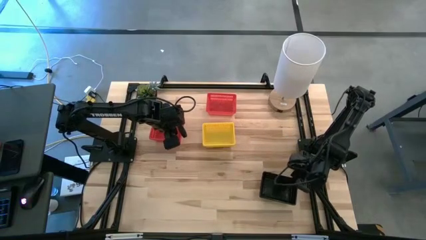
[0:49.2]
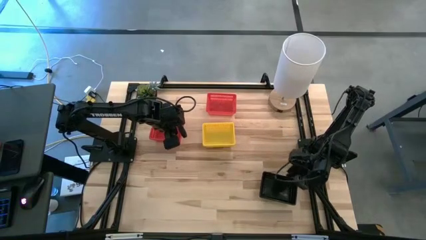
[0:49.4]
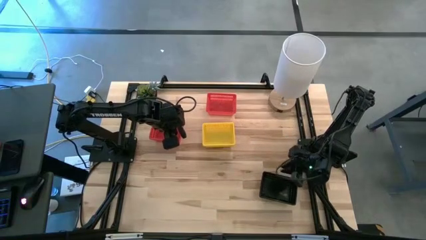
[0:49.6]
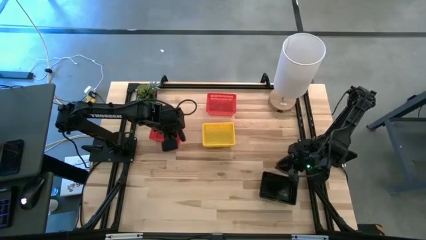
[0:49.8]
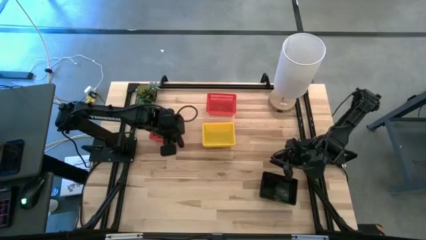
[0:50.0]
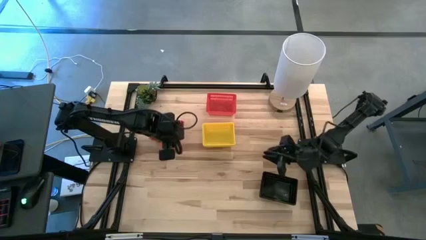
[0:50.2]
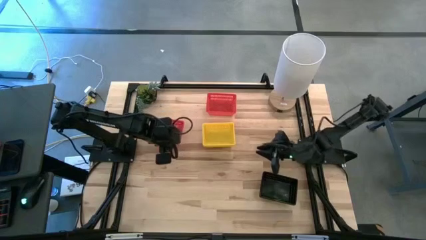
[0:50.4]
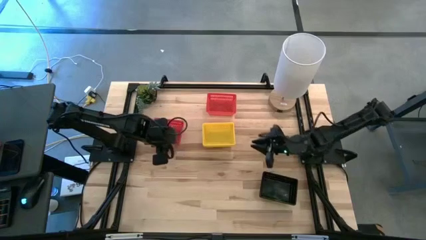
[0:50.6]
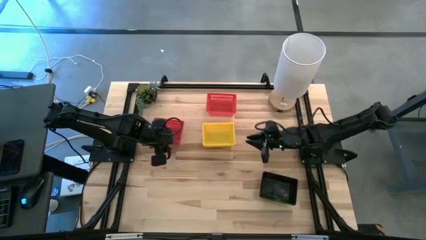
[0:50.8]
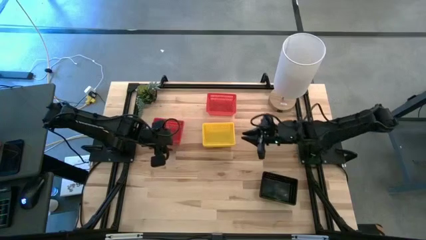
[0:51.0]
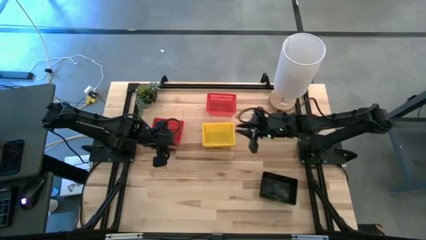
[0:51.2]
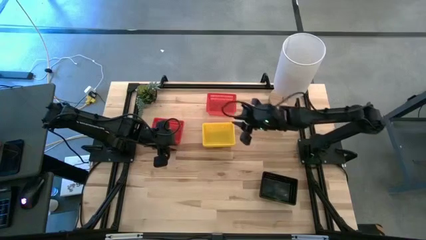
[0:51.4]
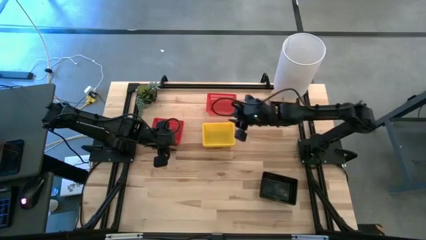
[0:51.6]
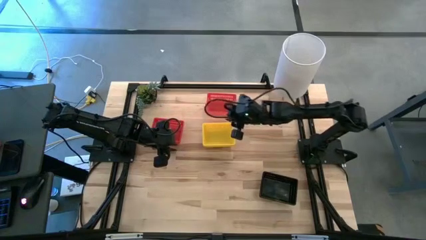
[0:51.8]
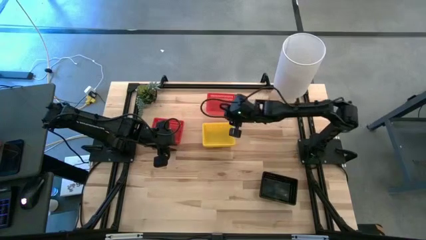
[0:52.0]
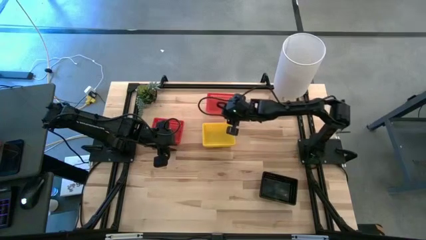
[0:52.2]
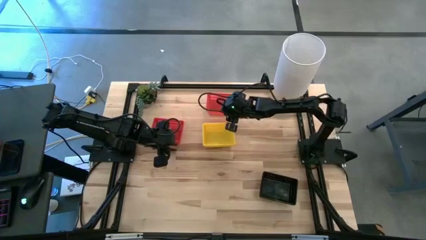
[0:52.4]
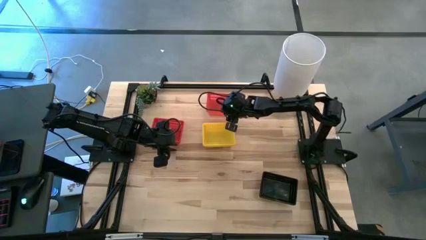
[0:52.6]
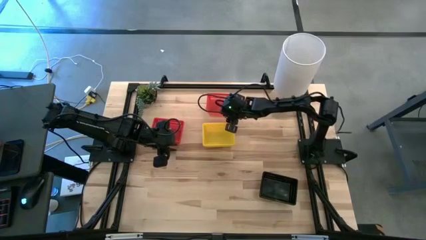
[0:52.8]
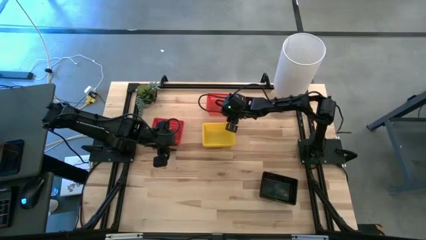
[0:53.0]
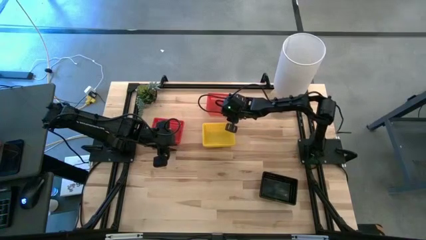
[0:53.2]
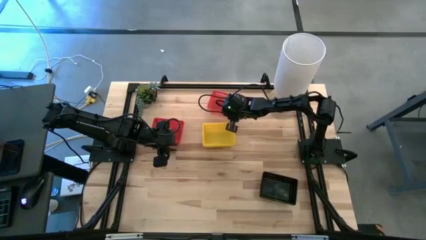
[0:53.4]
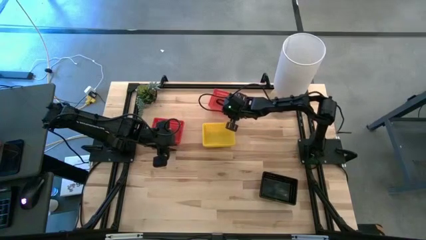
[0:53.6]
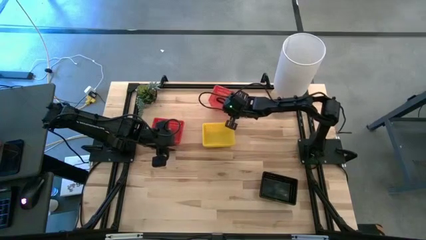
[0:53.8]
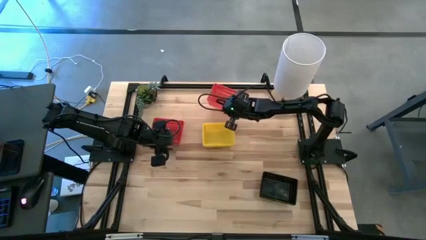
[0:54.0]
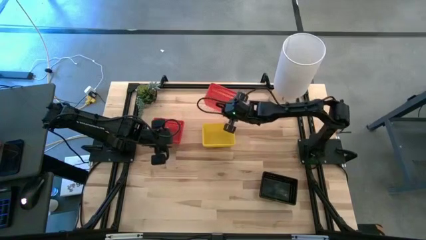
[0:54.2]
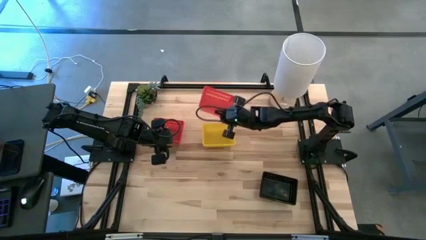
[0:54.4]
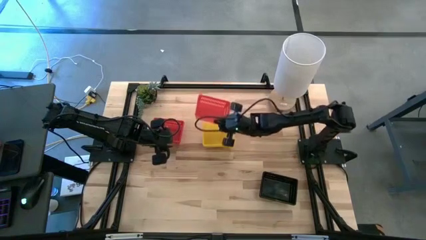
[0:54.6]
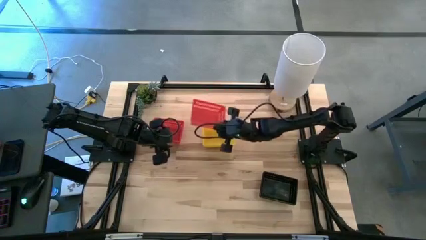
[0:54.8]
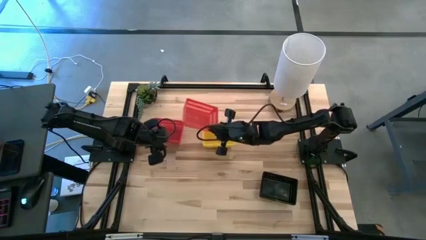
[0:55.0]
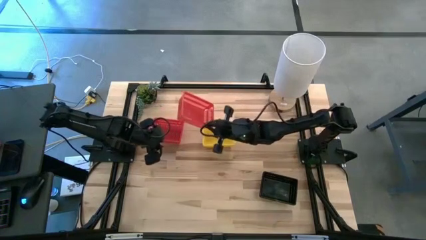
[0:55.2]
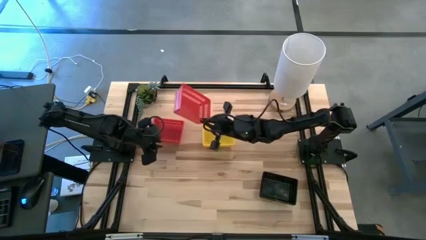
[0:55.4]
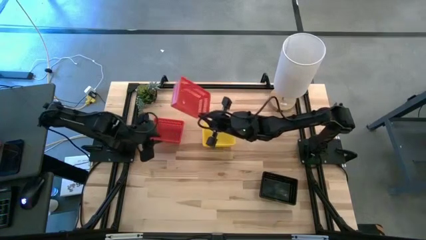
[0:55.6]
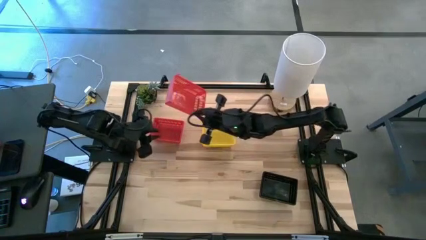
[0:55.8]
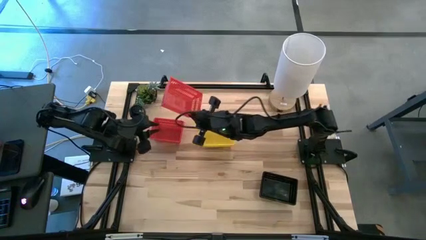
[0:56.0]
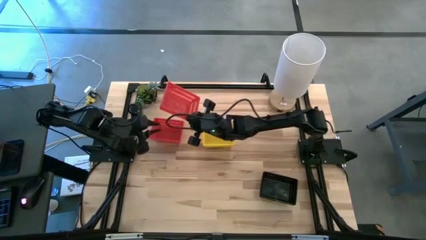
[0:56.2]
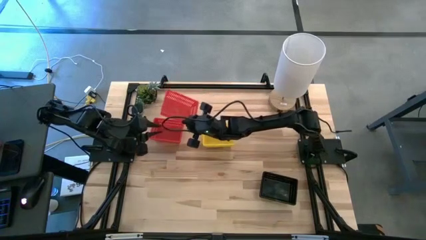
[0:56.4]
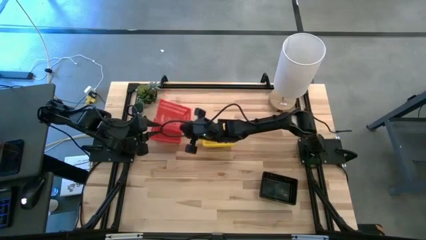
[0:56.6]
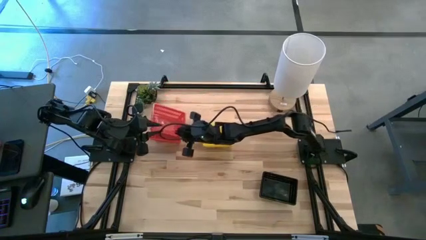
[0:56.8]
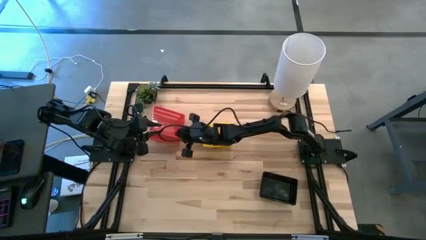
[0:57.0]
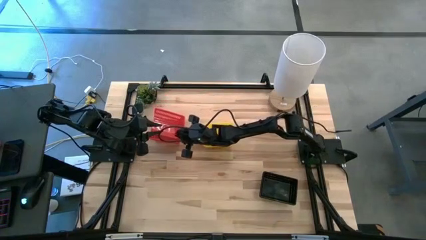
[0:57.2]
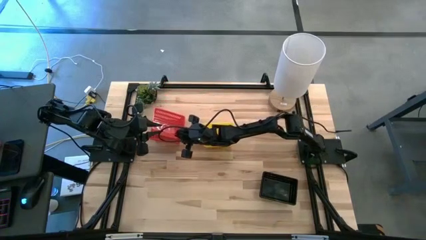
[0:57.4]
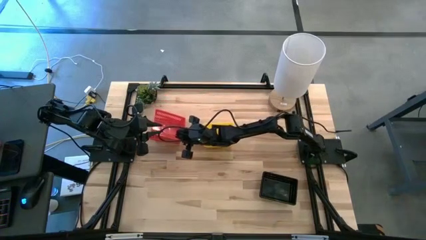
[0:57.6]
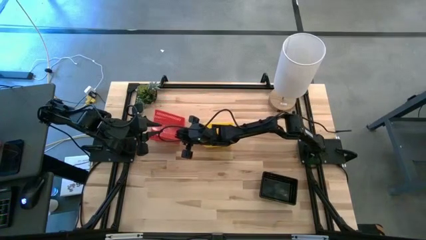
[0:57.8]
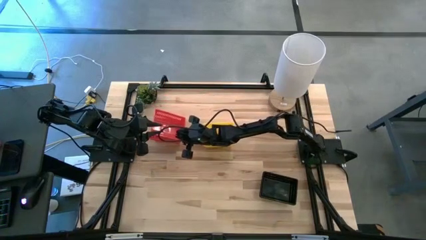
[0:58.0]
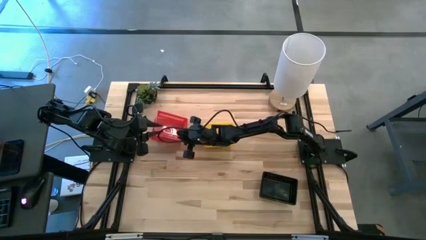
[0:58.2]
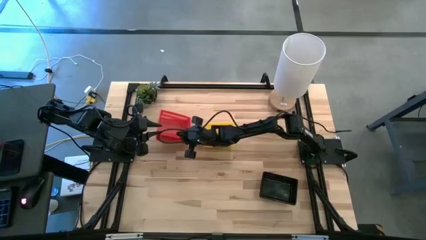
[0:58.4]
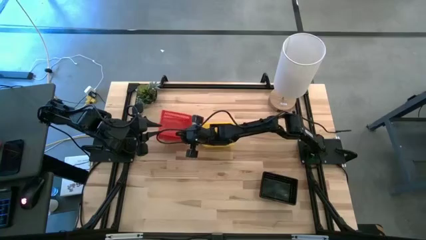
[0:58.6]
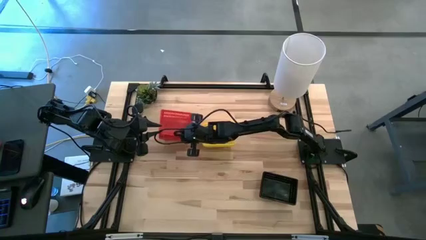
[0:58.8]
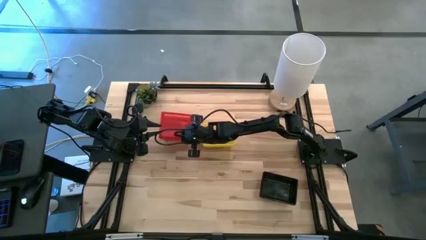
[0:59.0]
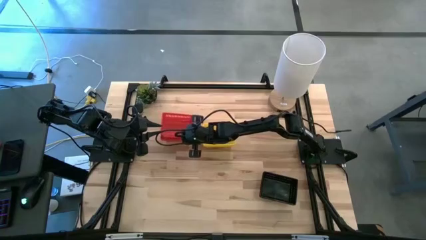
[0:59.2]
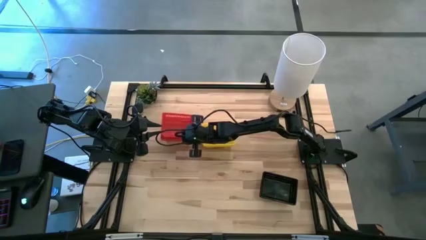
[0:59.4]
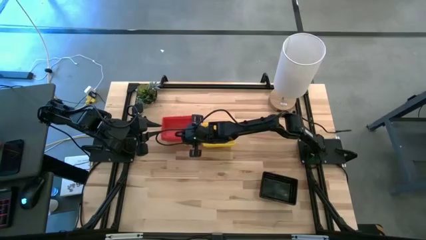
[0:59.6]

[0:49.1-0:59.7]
Stack the top red bin on the stacked red bin

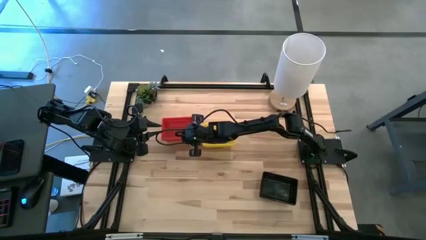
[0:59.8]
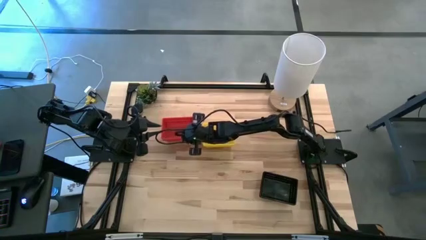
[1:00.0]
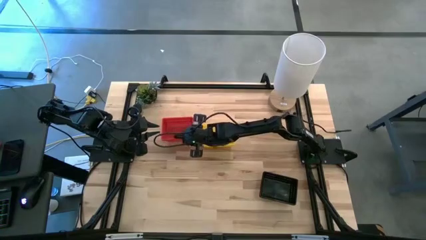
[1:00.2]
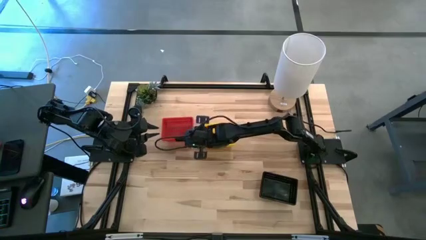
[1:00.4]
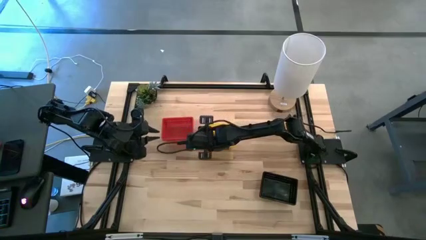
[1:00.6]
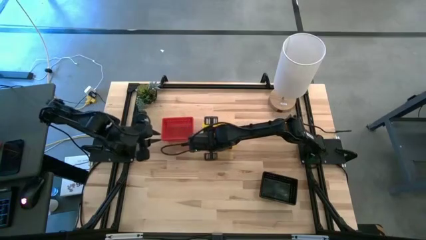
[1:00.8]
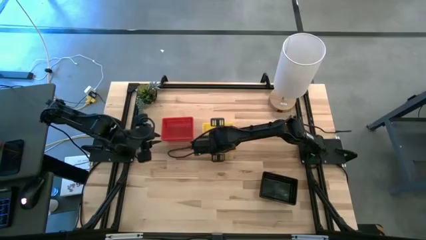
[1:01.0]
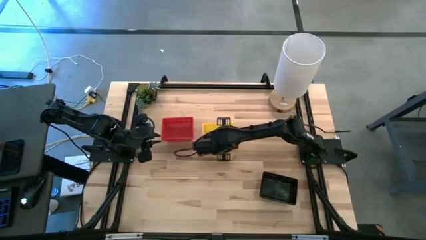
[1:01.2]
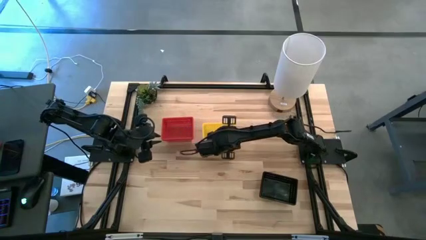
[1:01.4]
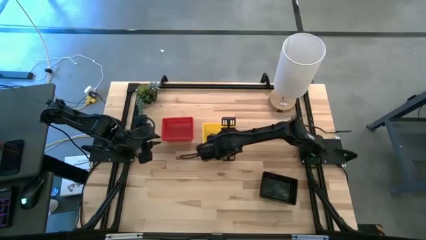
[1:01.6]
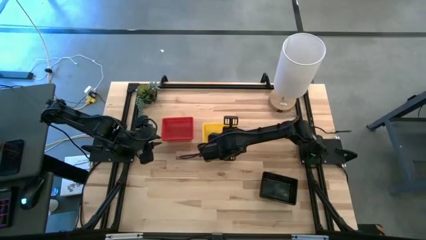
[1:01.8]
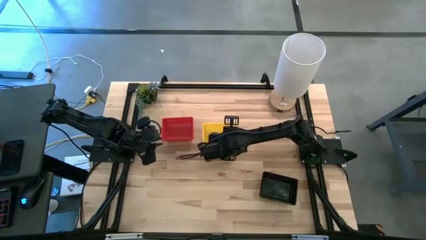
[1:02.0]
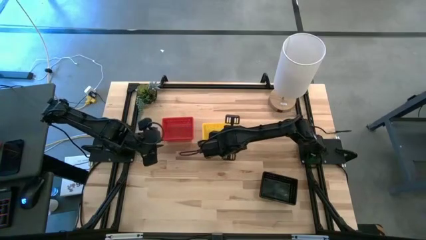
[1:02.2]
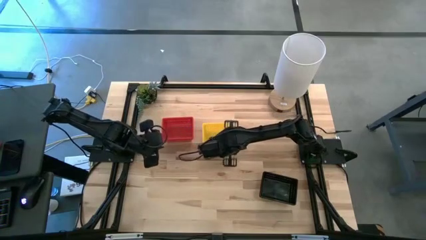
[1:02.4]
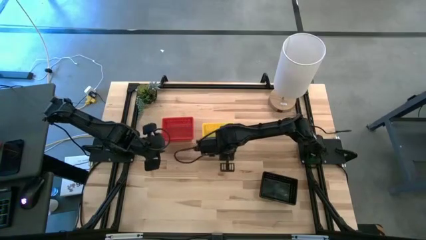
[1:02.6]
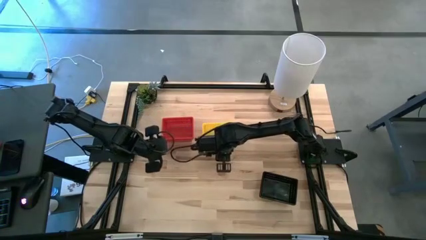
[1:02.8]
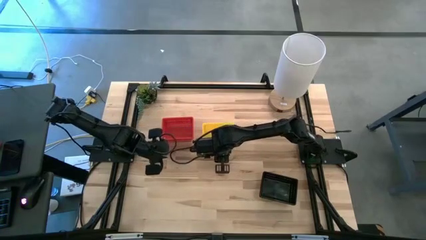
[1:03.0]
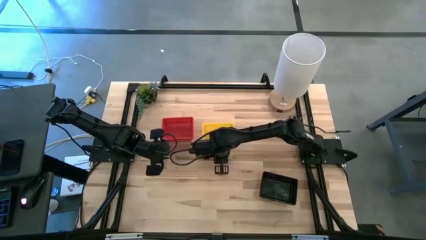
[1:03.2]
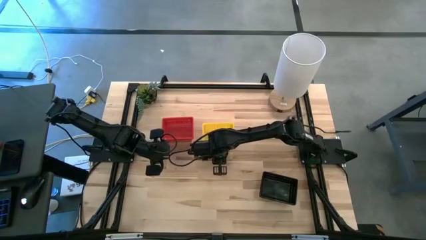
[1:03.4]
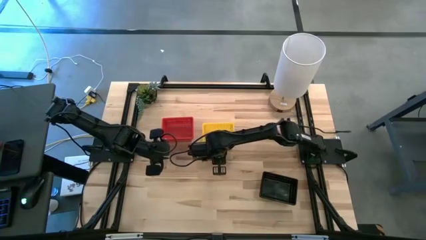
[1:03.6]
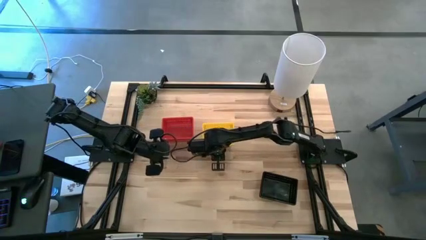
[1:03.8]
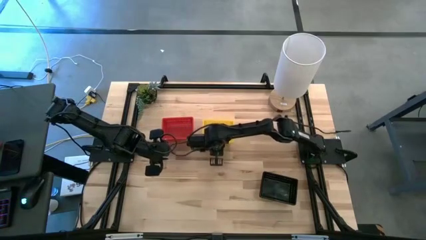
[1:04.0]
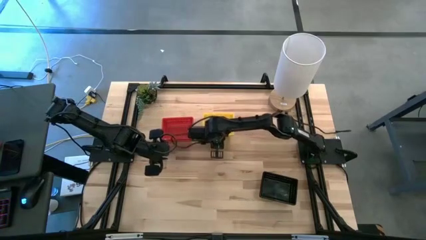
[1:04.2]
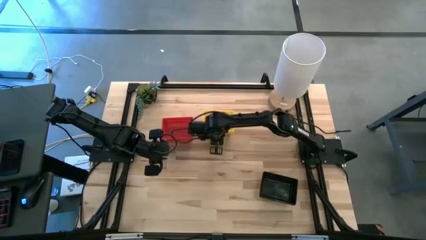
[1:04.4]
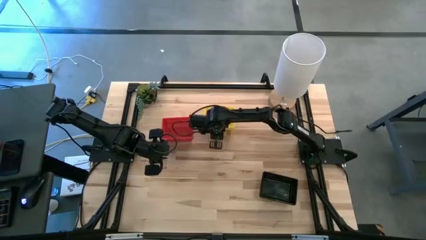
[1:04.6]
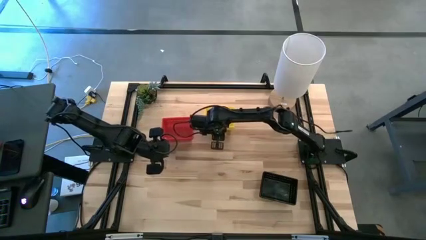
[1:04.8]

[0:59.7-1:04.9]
Move the stacked yellow bins to the top of the table

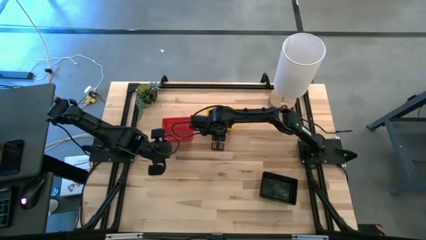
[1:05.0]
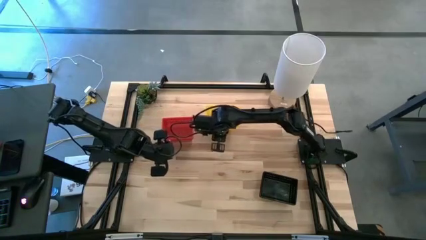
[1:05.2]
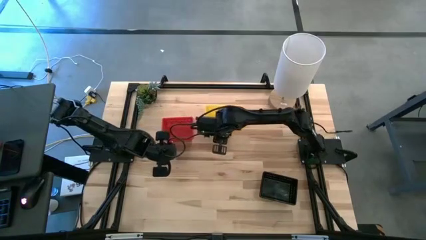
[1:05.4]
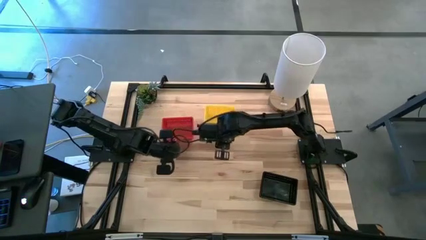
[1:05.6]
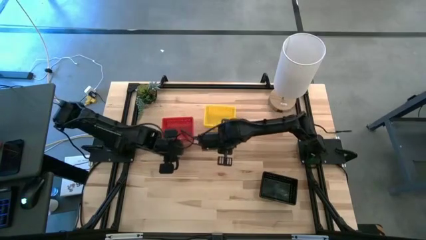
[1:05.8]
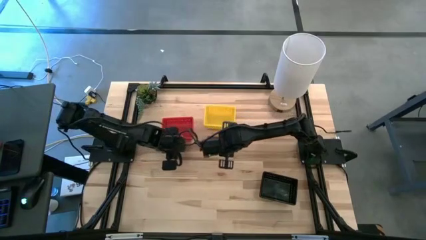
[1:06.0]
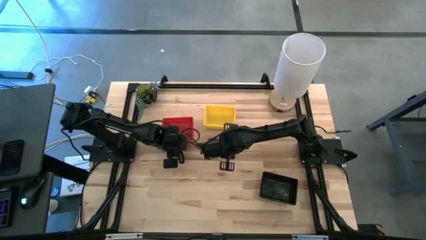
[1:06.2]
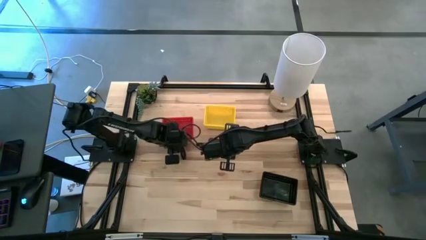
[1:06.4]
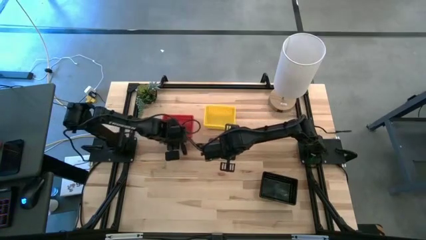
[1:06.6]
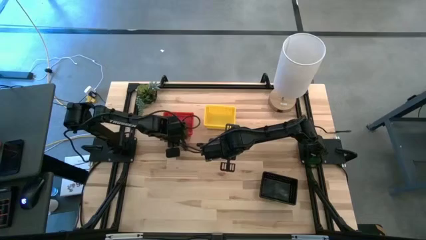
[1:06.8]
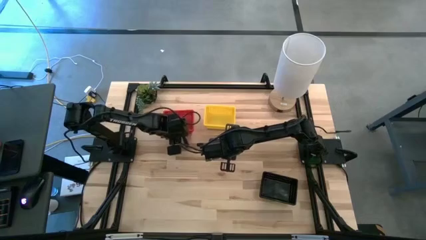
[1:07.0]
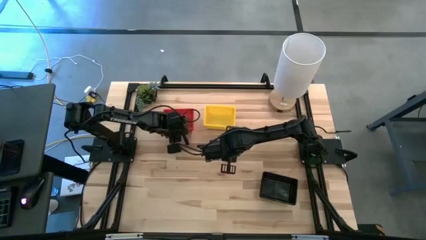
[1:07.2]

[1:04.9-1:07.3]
Adjust the stacked red bins
